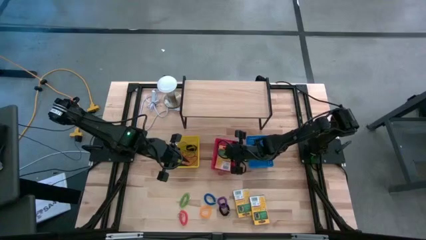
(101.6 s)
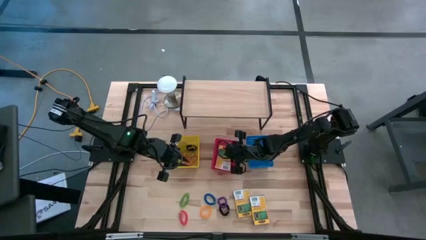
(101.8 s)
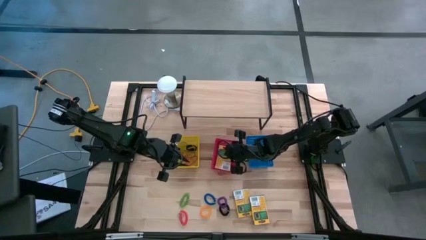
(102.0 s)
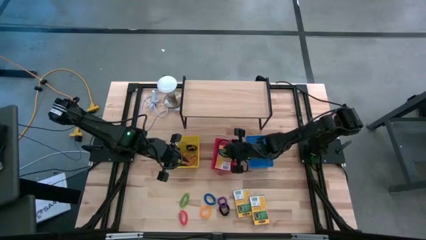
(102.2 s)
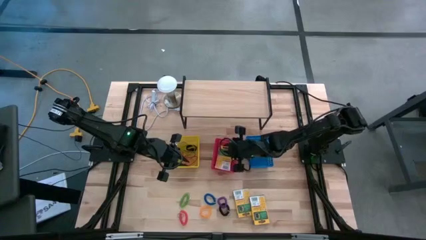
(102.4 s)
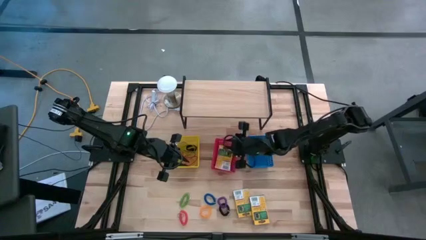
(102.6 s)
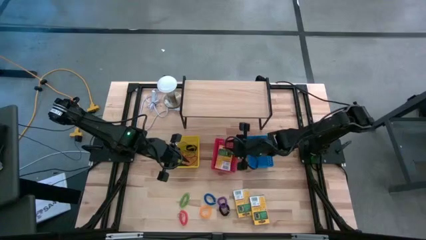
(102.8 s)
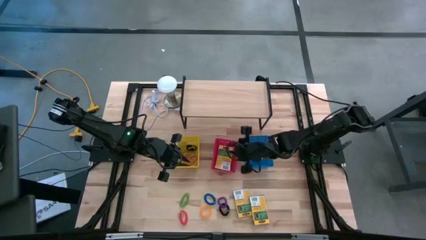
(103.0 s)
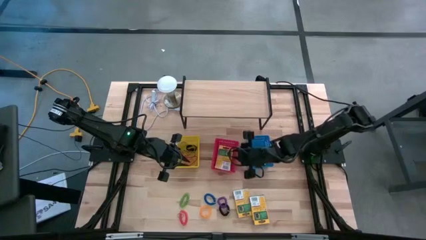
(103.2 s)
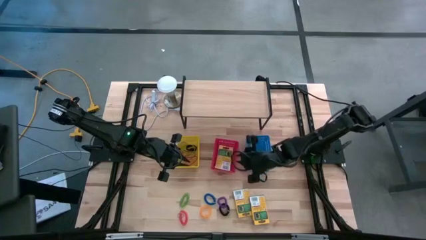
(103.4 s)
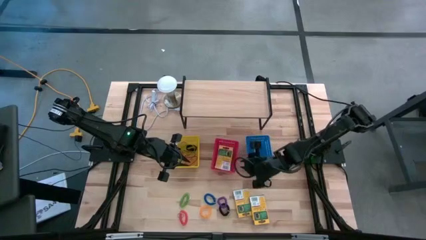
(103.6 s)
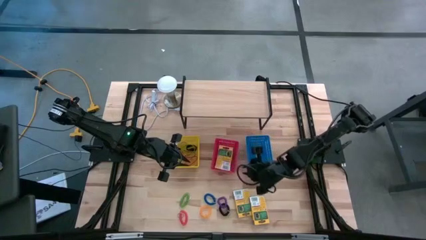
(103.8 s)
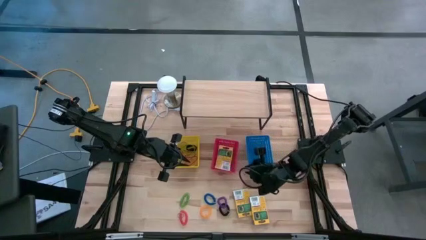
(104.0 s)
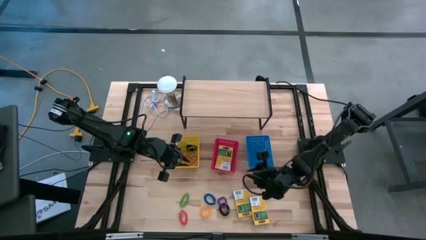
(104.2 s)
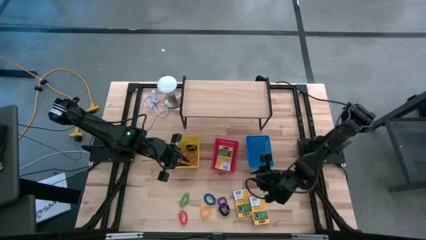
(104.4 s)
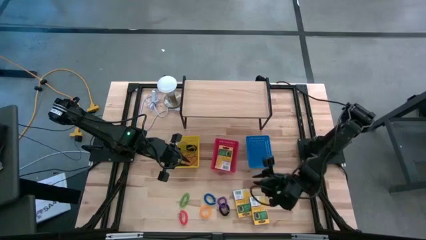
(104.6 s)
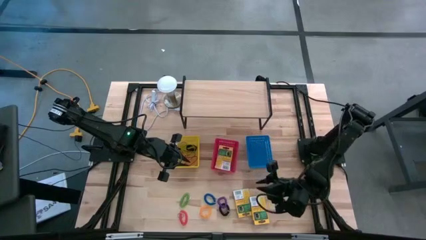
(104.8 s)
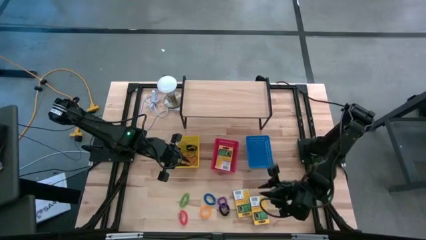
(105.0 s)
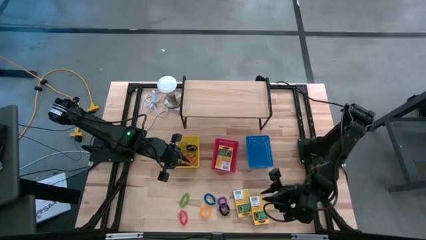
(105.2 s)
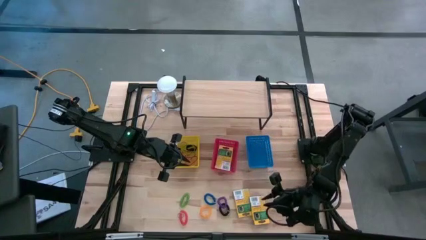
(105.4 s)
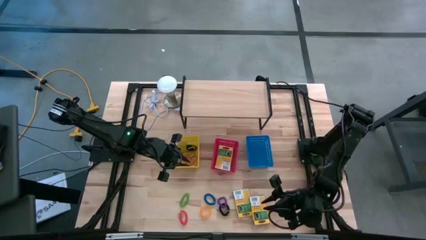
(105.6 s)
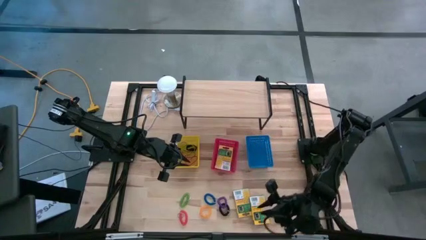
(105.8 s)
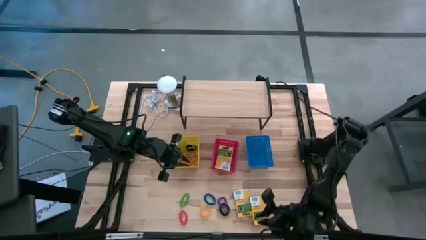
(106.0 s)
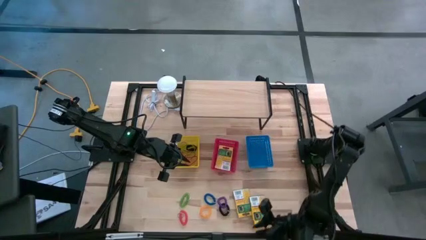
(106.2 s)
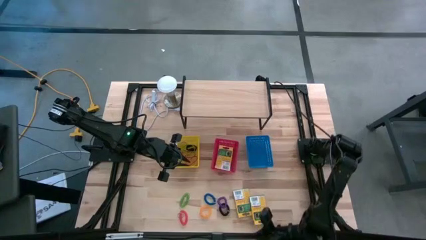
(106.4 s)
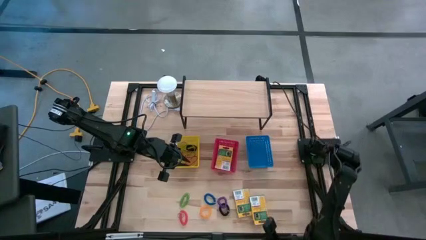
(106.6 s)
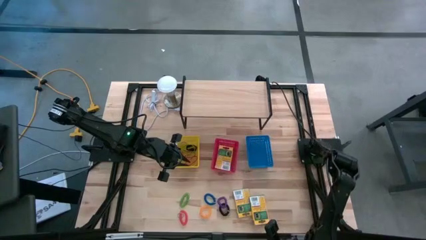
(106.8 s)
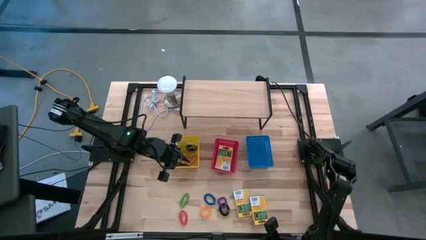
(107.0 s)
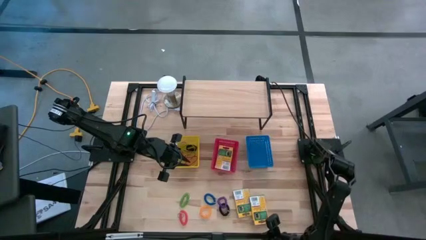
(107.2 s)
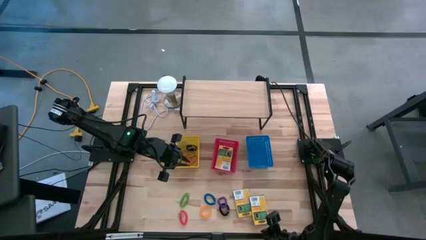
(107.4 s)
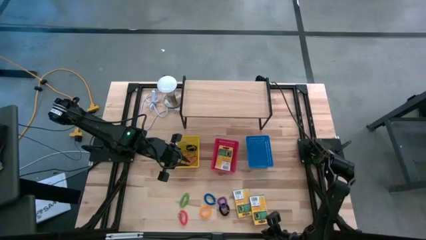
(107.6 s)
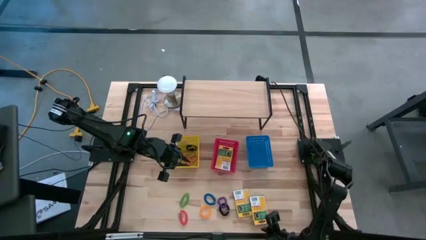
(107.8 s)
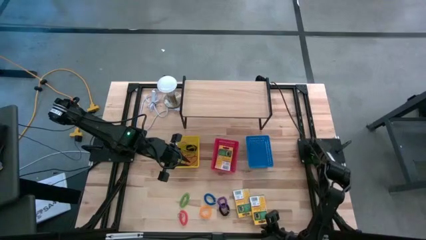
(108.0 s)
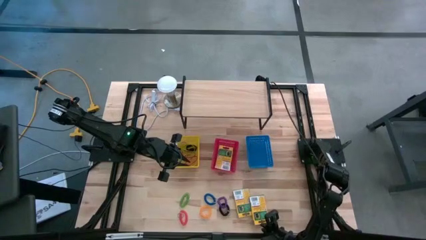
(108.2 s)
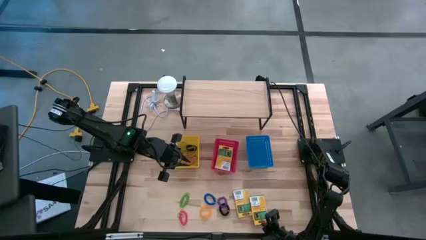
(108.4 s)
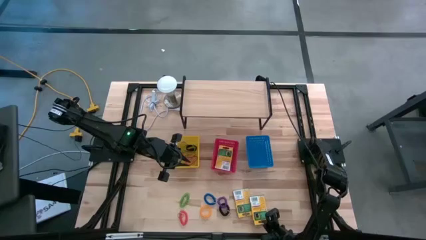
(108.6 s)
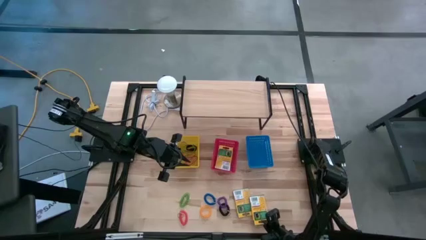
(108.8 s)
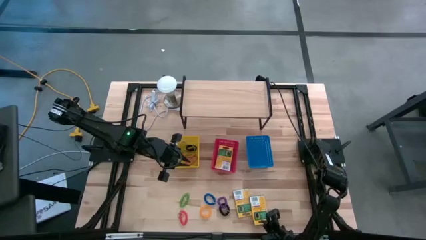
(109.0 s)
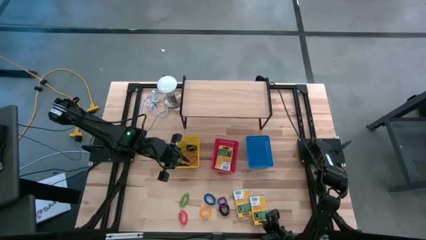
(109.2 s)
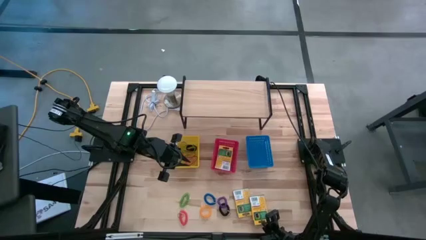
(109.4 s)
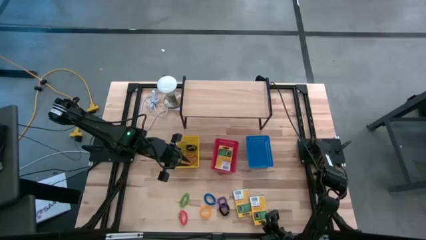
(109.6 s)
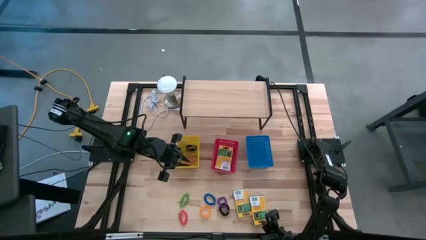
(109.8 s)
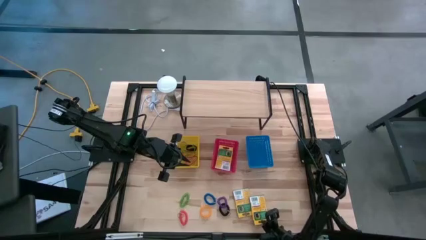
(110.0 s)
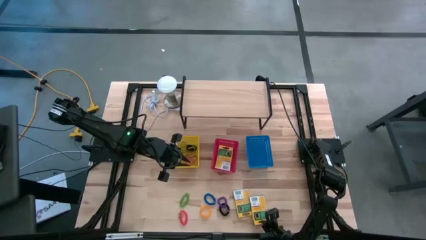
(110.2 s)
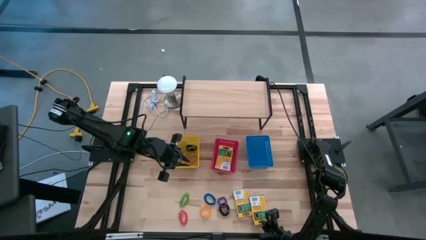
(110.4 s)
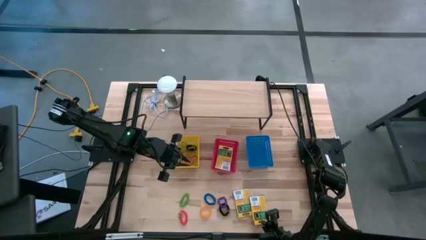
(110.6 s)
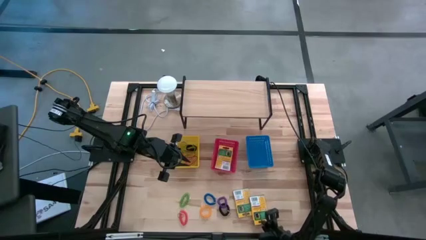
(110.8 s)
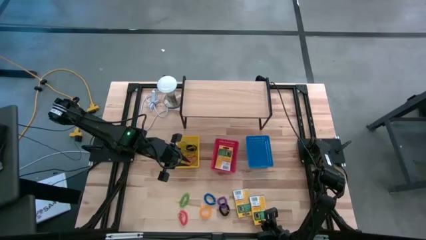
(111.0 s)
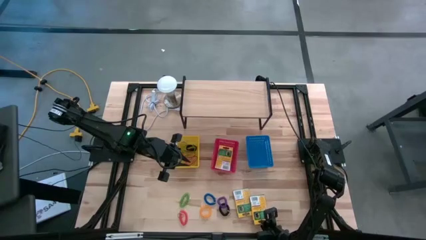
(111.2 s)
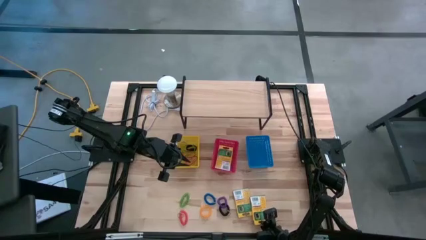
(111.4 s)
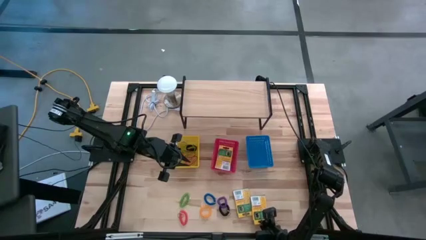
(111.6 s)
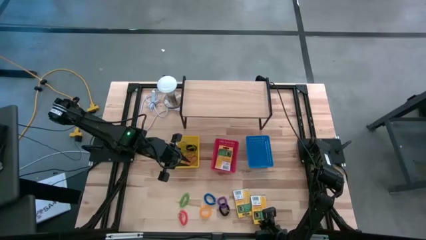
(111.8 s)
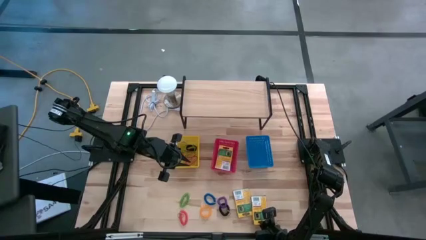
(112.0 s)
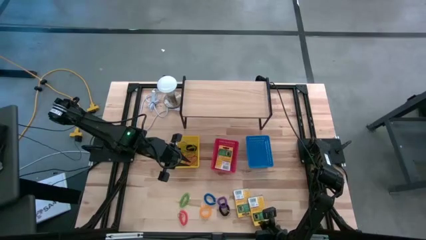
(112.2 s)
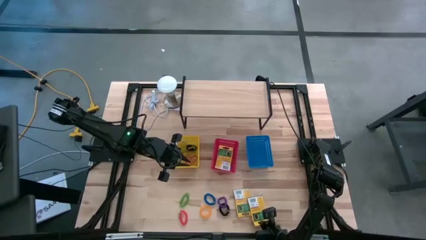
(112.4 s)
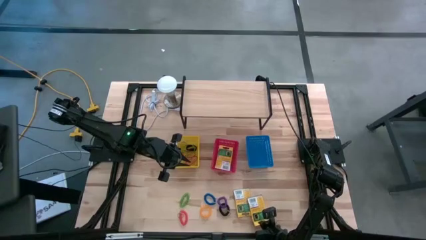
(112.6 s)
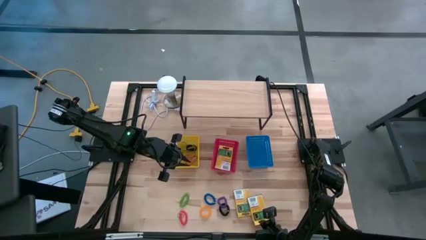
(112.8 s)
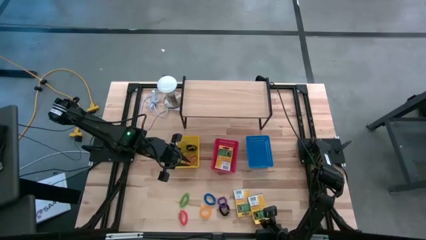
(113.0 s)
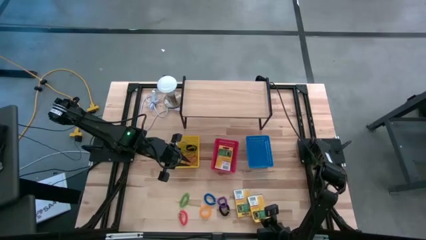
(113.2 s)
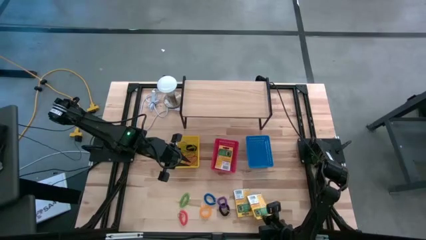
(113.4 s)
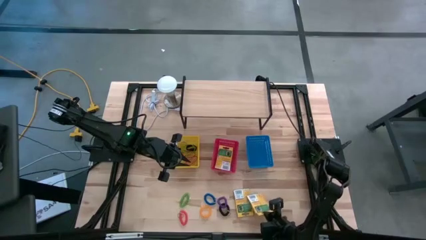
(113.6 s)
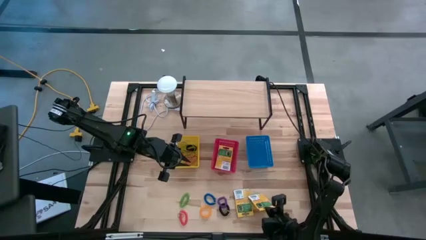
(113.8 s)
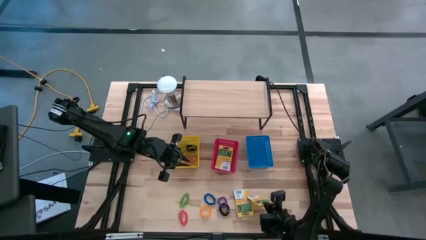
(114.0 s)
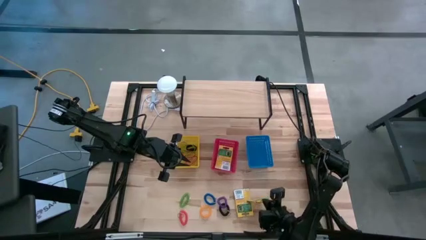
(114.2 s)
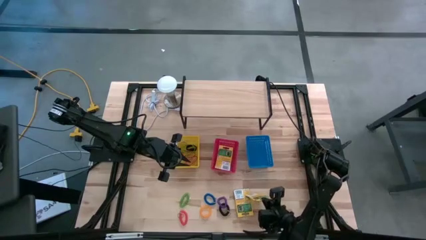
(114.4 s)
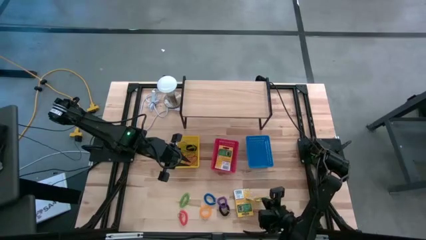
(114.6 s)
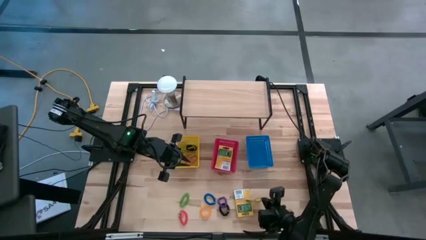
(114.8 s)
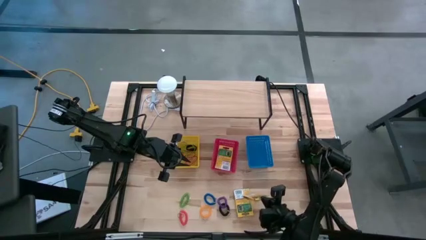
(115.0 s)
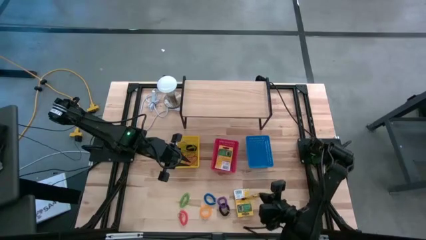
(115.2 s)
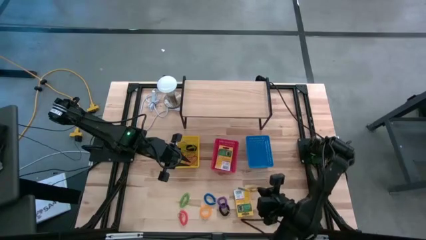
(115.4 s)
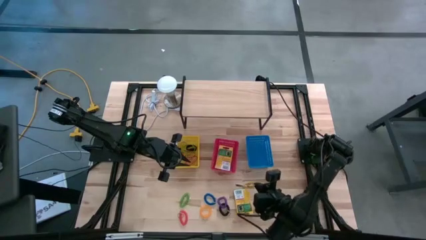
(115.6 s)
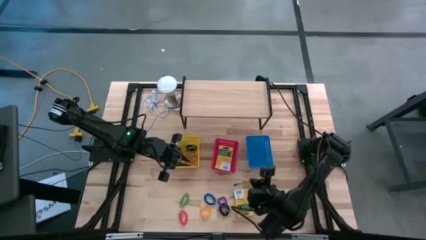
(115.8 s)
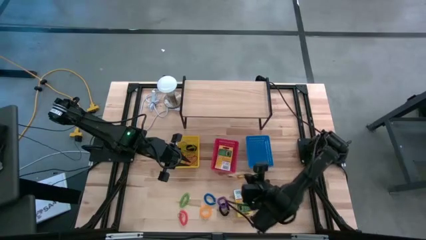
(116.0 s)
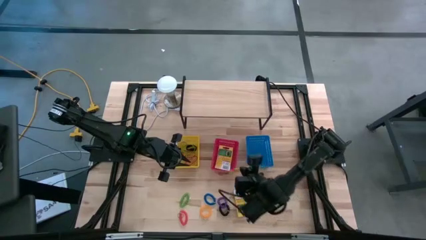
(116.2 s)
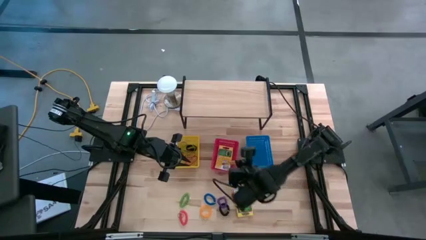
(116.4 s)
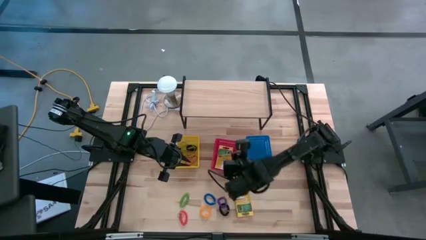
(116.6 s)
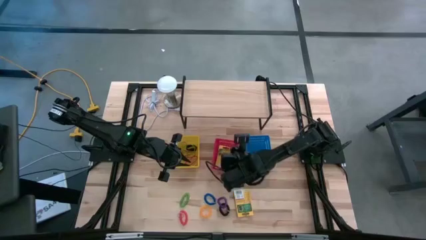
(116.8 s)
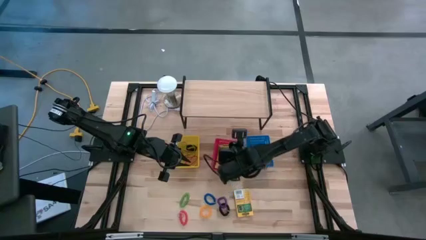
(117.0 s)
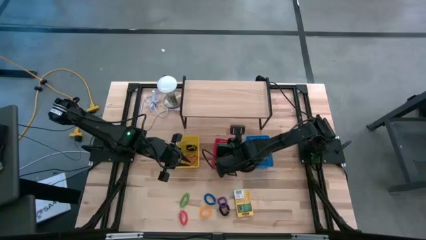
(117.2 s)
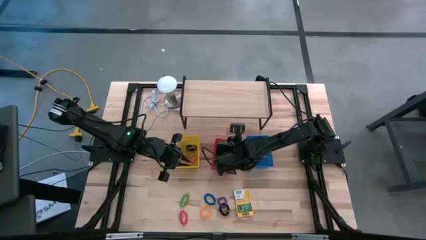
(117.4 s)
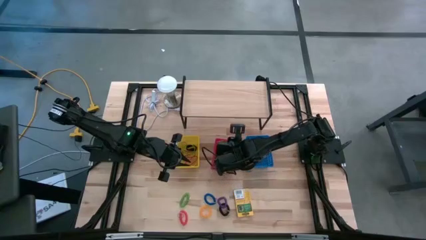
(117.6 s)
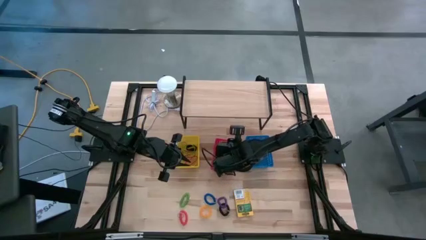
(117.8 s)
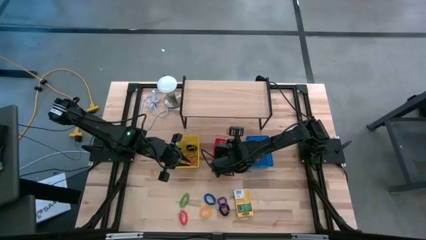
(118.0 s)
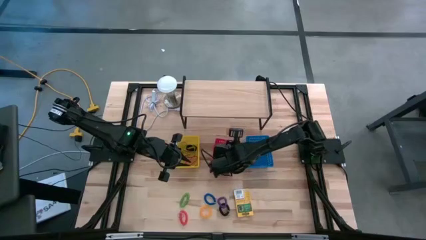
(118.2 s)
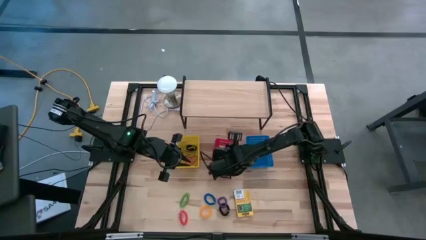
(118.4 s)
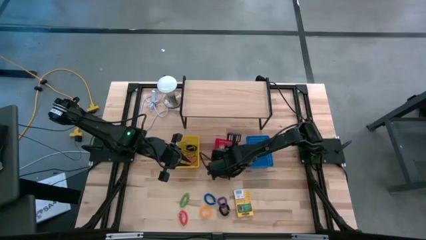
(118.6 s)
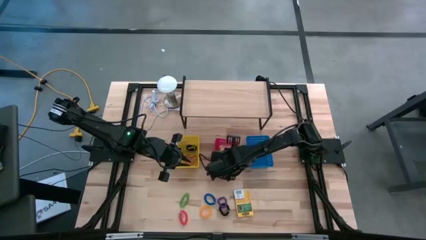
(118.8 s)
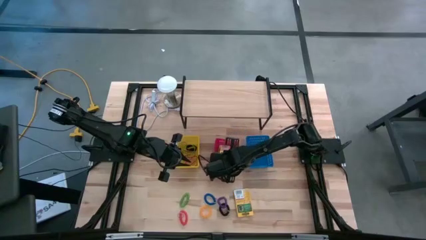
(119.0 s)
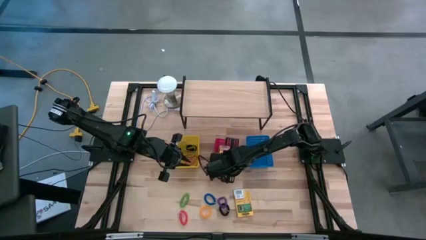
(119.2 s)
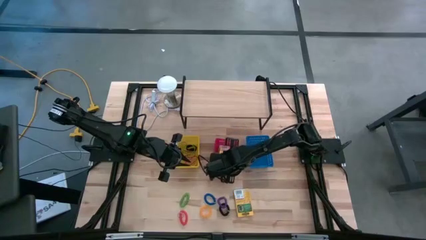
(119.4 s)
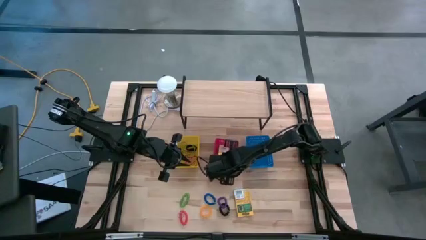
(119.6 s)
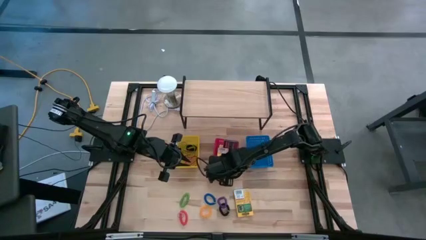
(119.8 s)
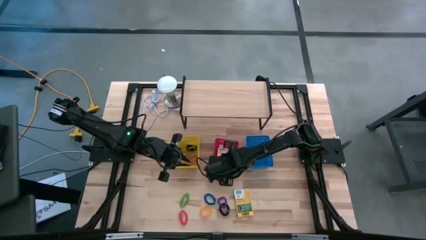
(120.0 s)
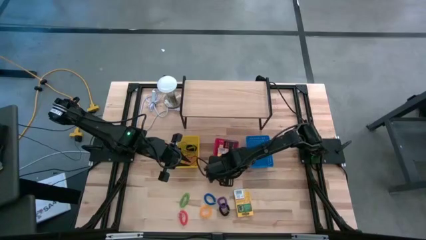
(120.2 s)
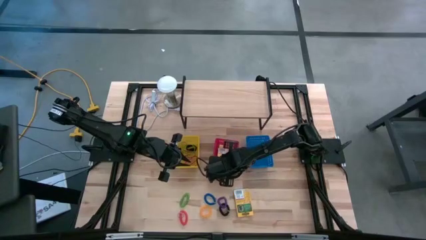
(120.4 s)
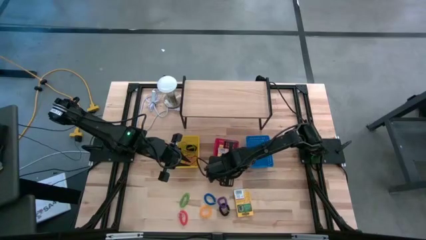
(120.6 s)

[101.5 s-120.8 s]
Task: Pick & Place Office Desk Supplies
Stack the yellow crayola box on top of the yellow crayola box in the red bin
